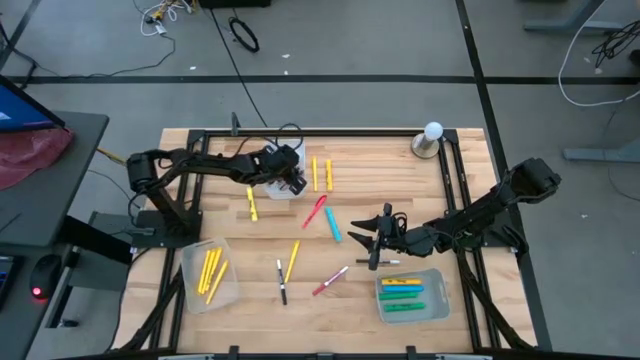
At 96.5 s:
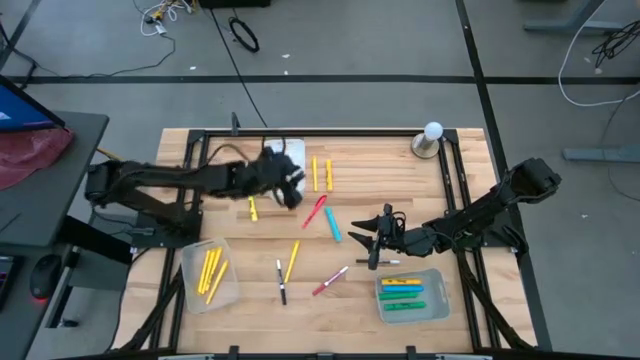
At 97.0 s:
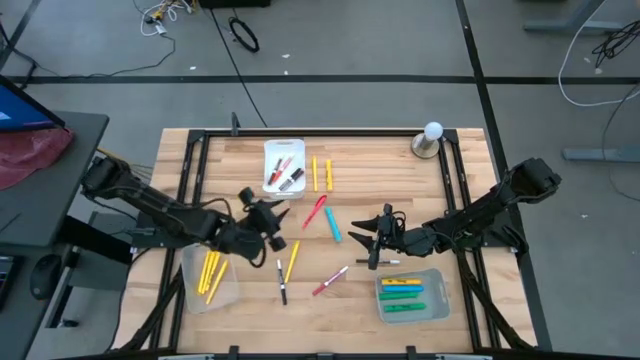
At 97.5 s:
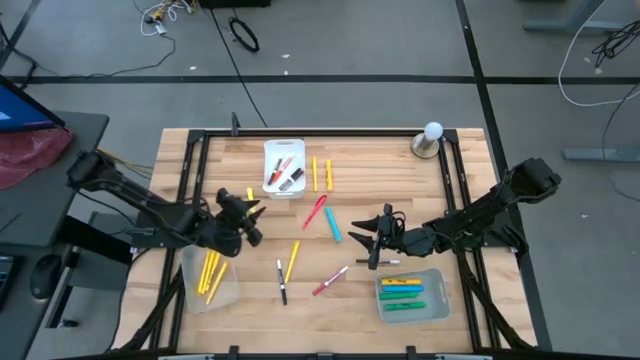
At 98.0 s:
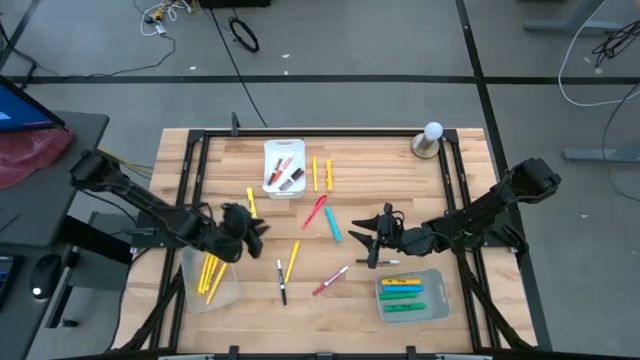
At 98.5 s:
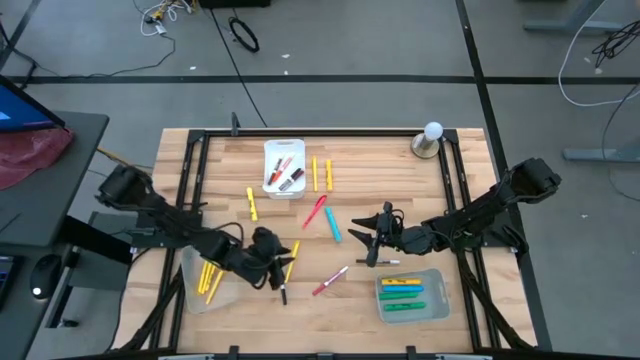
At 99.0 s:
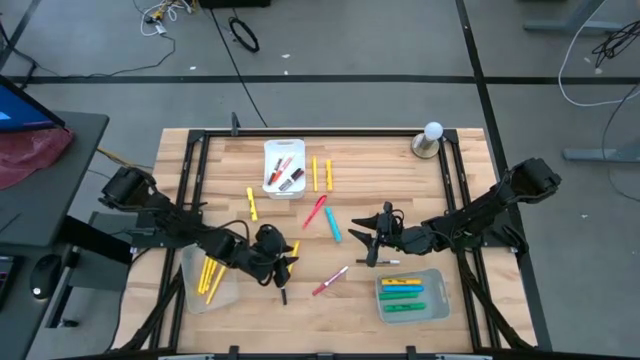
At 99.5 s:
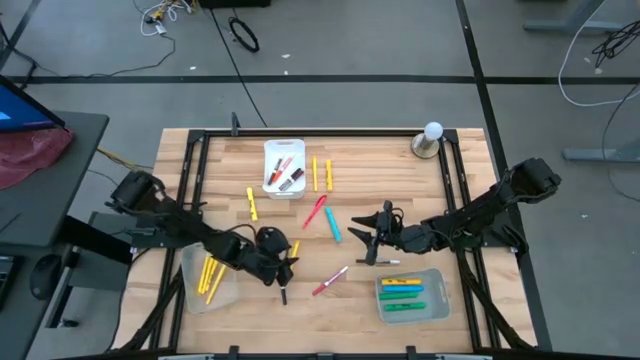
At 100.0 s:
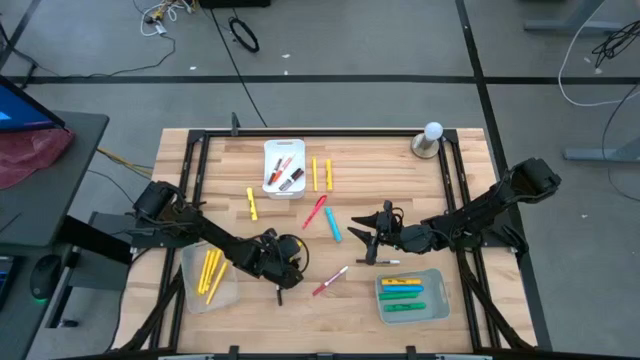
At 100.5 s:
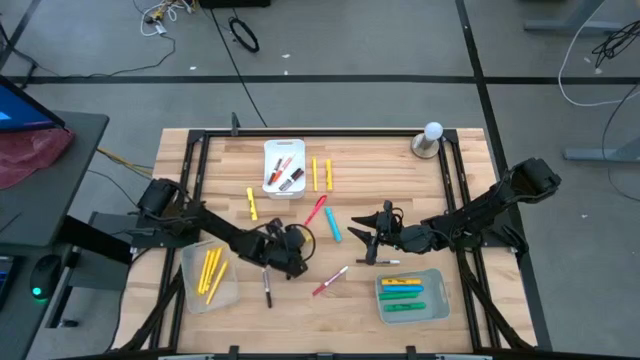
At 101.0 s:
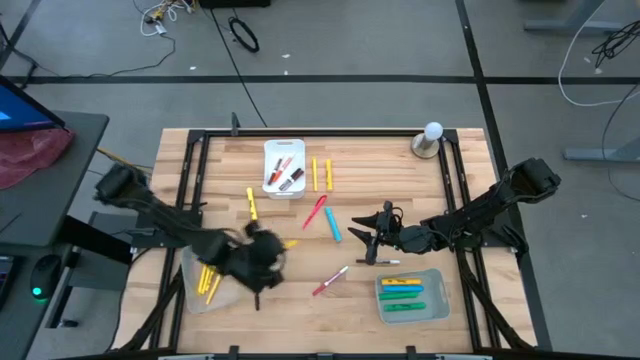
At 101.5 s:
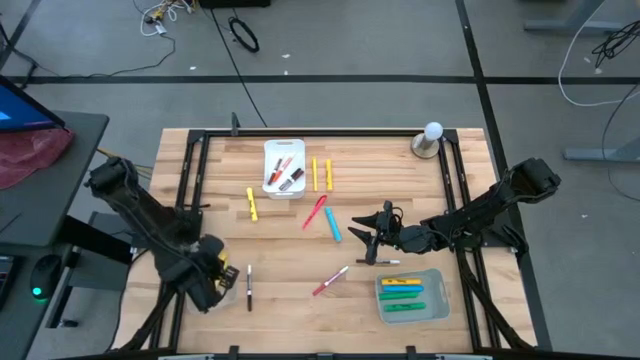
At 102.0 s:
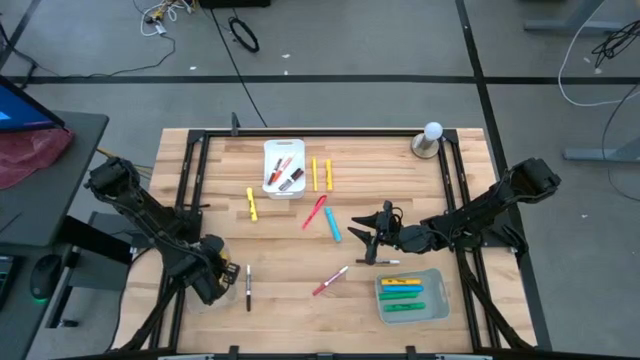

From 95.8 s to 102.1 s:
Task: Pick & Place Markers
Put the yellow pen into the transparent bin

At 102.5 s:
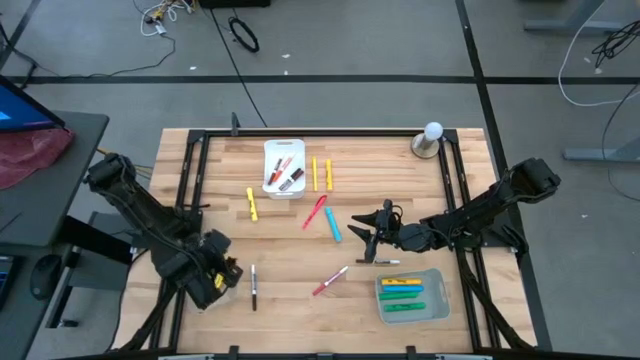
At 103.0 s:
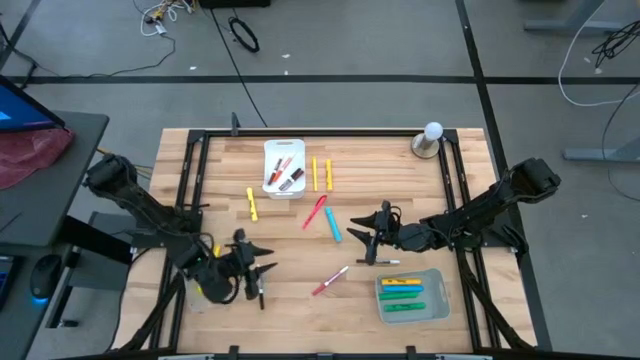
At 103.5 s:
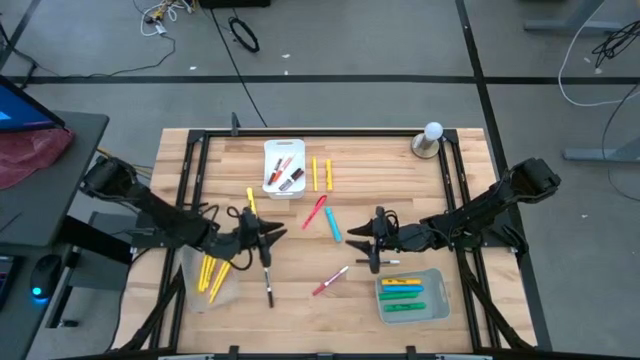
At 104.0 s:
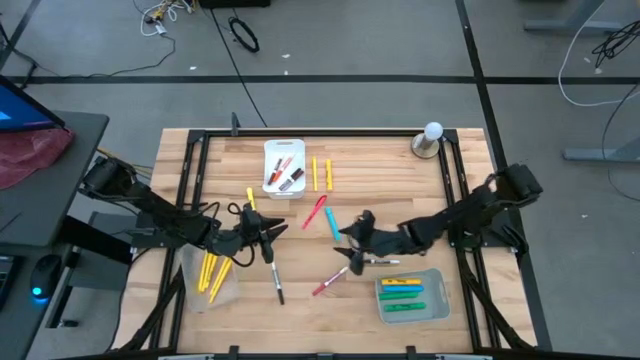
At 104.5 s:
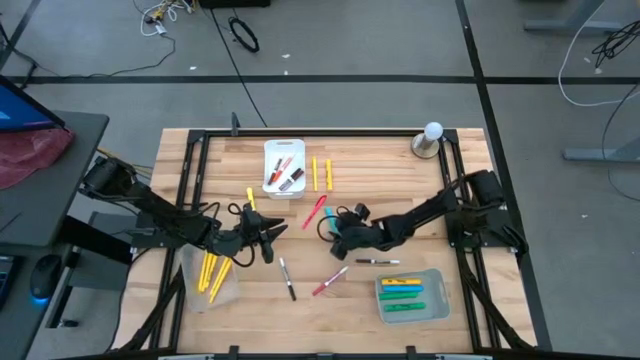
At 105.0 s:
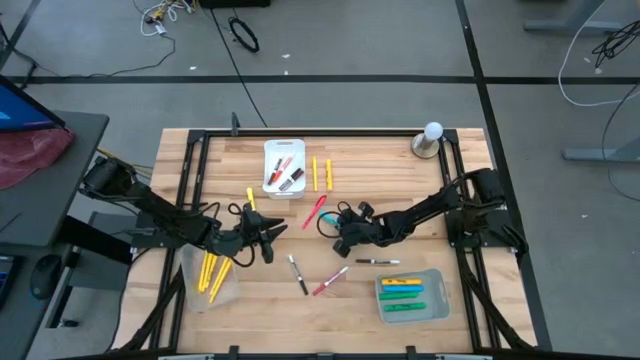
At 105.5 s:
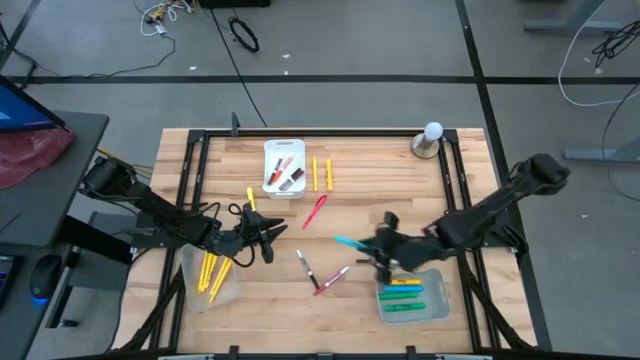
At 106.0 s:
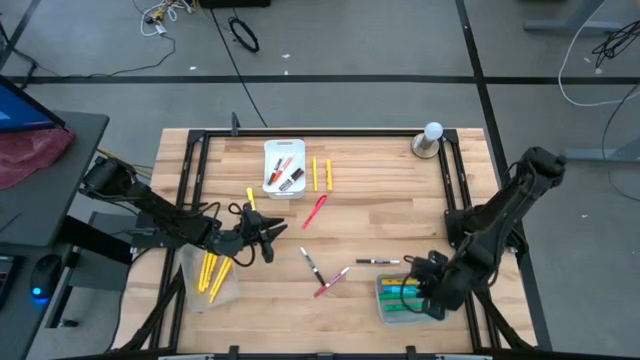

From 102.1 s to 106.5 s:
Put the blue highlighter pen into the gray bin

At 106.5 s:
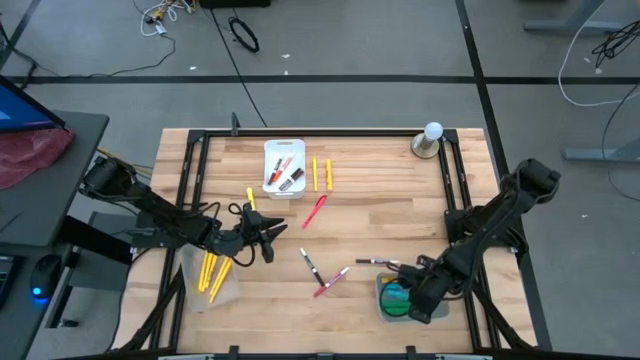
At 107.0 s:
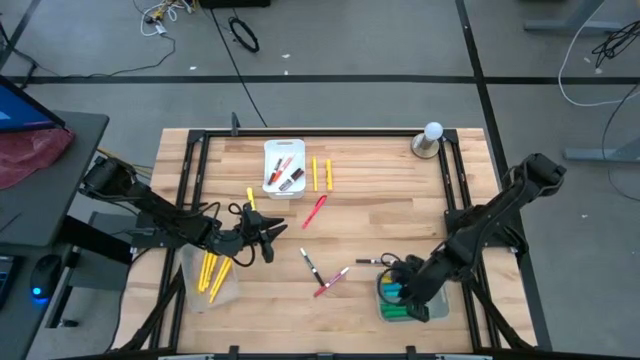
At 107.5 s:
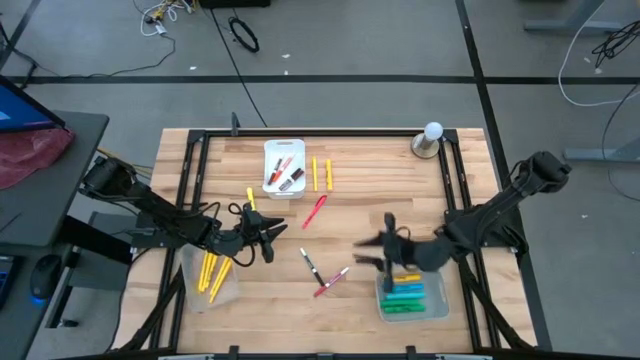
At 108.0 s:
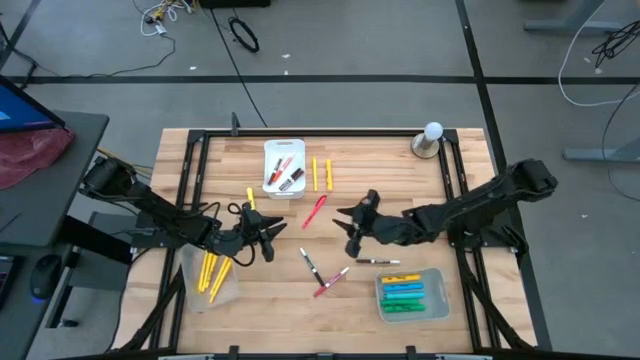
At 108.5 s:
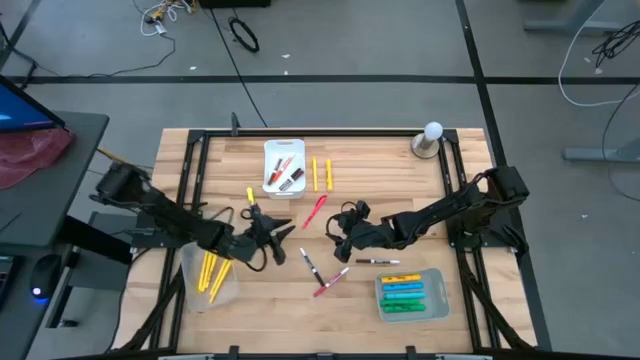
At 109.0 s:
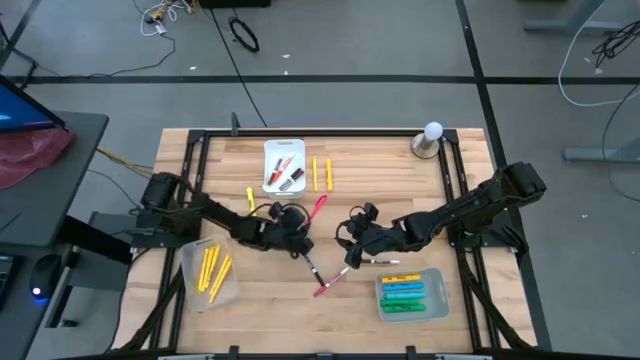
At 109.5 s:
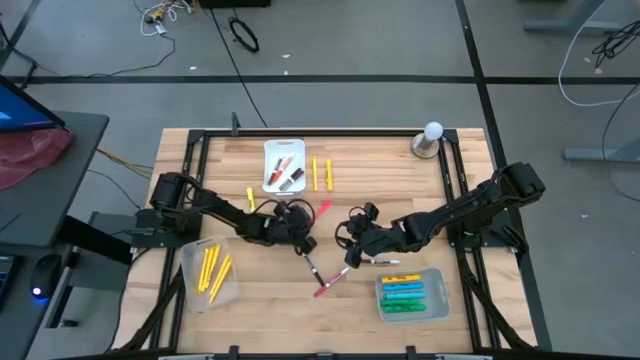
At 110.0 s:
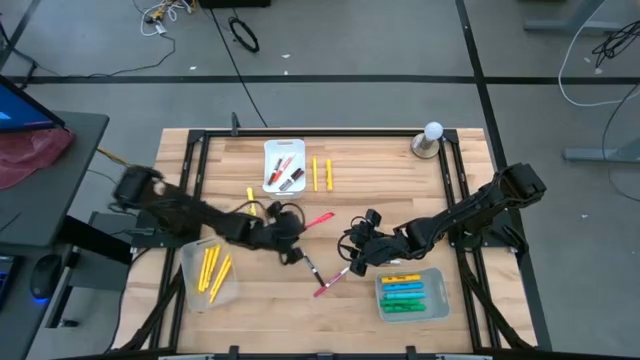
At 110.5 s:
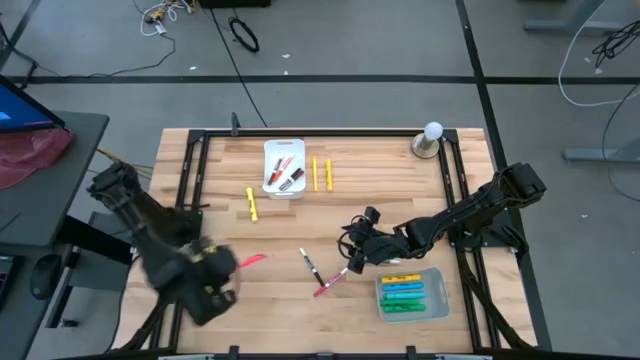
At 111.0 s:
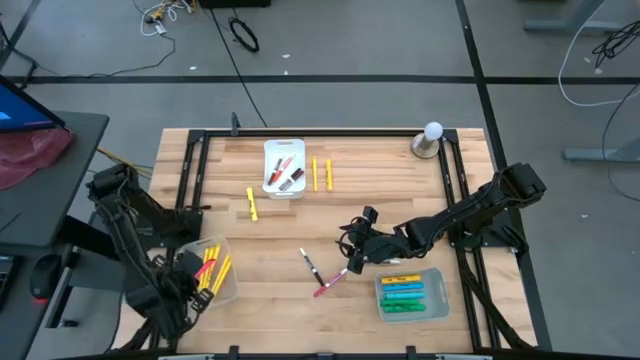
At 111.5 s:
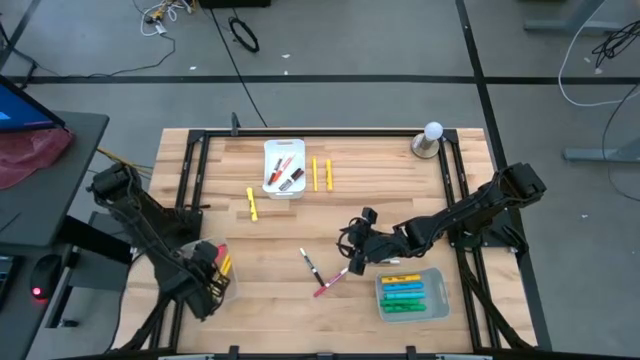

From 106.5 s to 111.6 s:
Put the pink pen into the transparent bin

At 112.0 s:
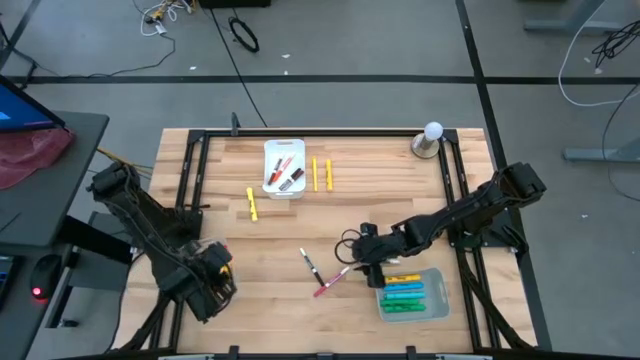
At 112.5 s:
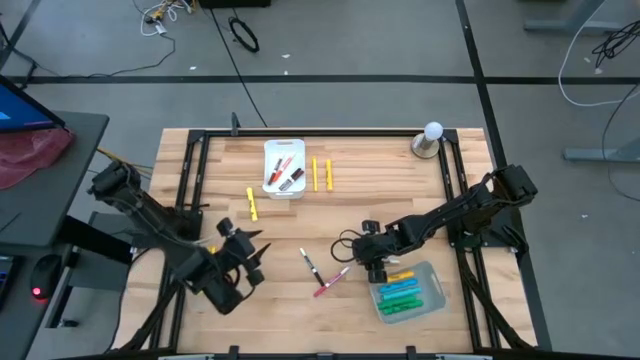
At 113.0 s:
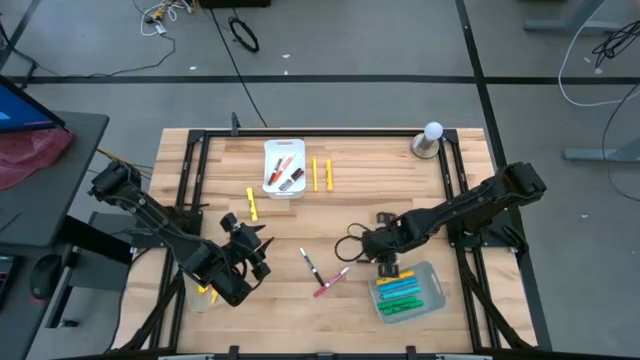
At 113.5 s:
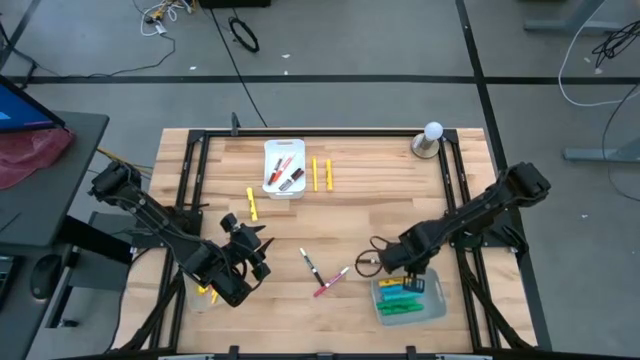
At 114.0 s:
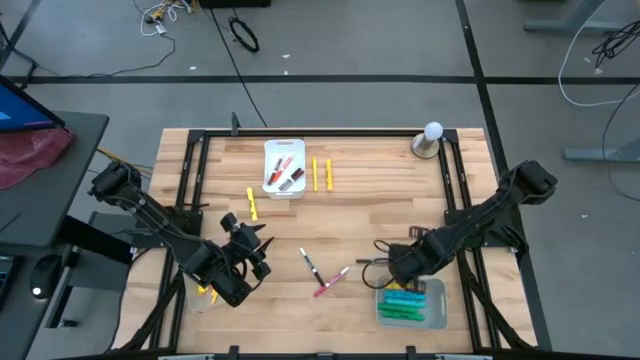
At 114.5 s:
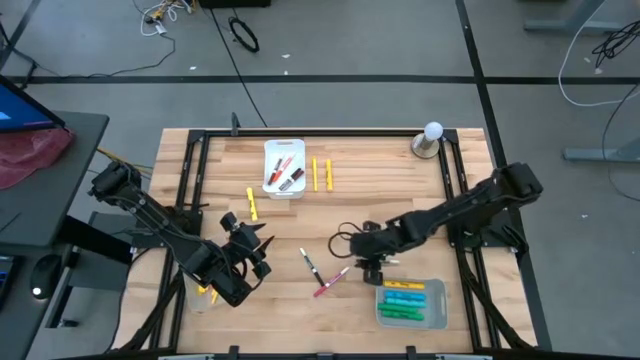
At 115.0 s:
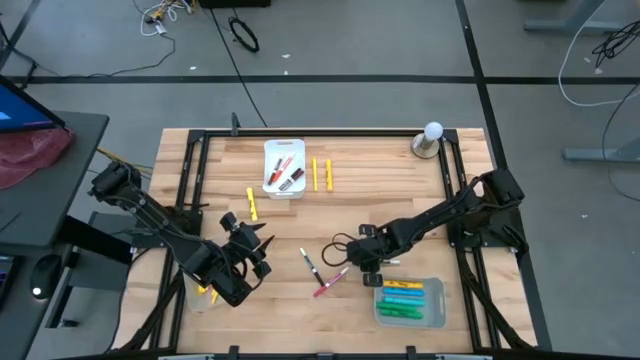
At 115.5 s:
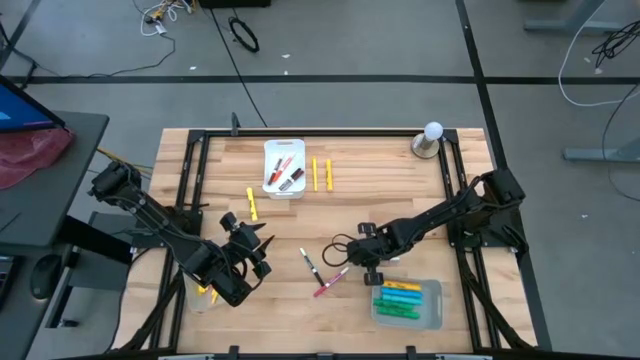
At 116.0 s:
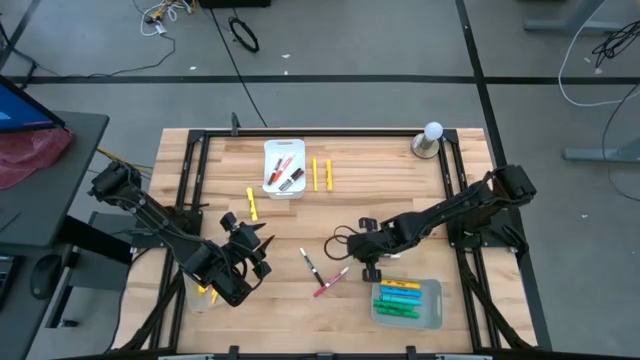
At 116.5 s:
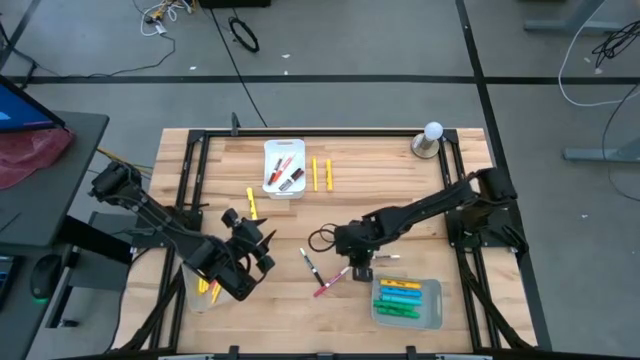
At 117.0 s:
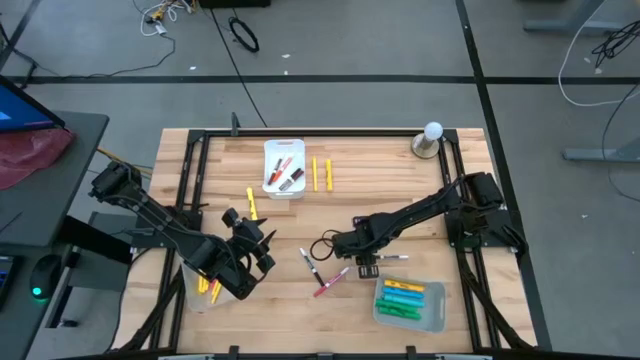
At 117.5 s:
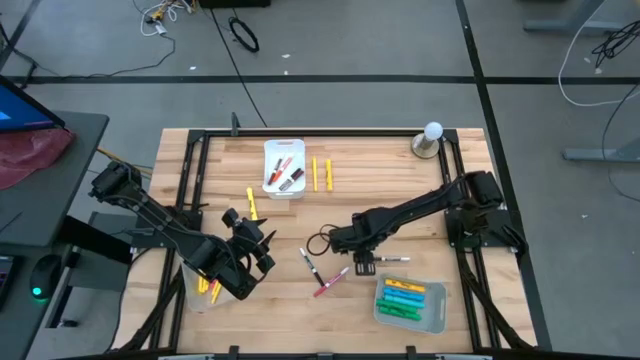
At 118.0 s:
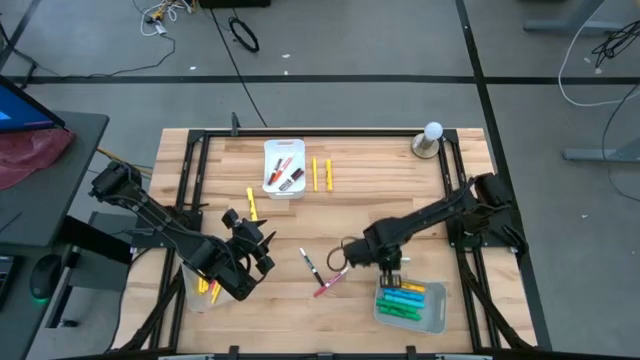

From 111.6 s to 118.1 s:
Put the brown marker pen into the white bin
